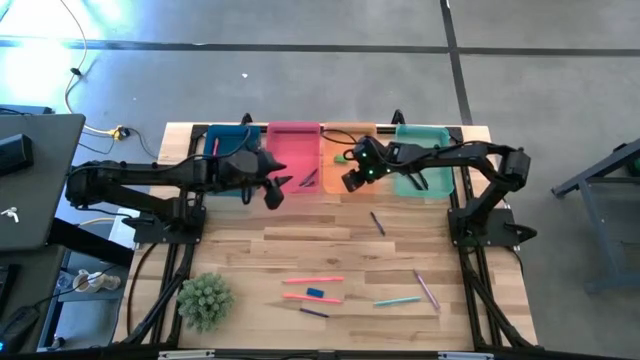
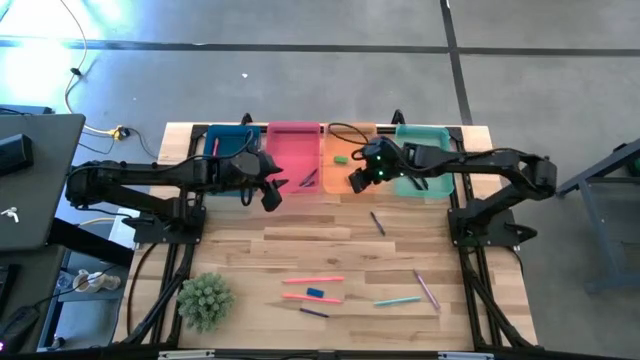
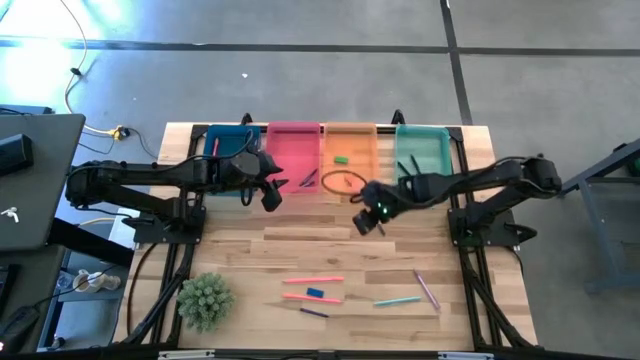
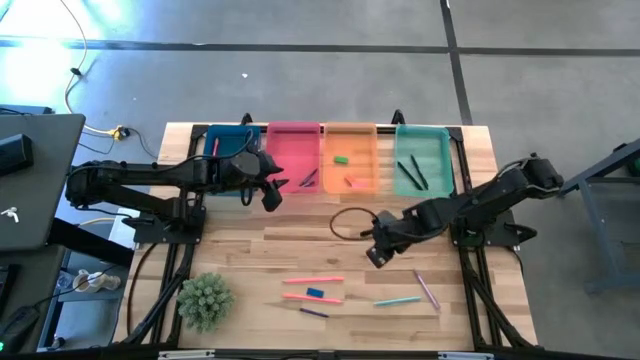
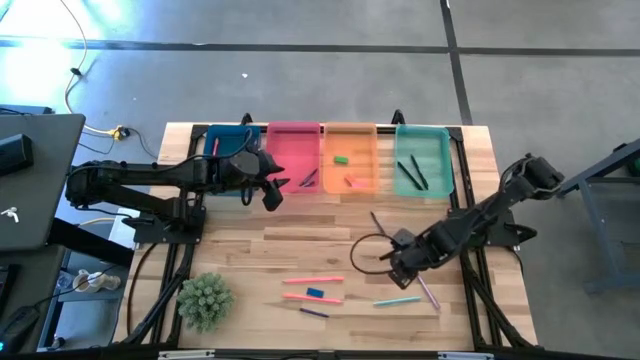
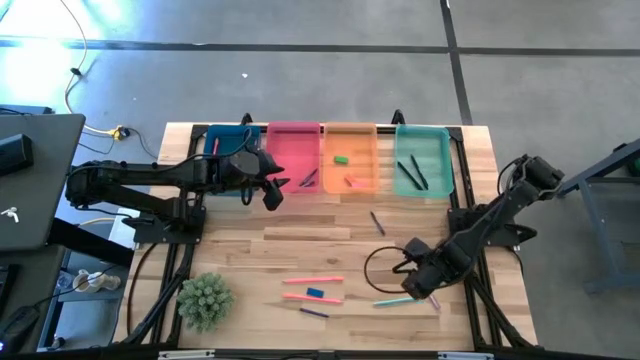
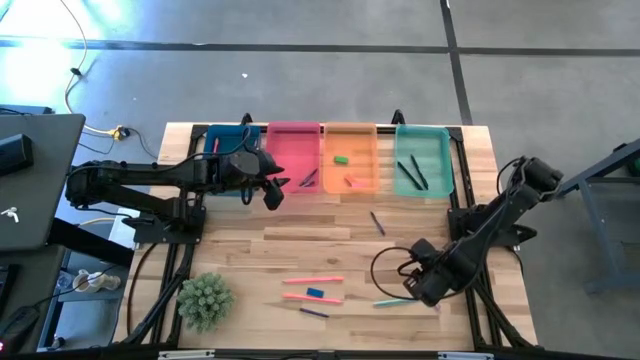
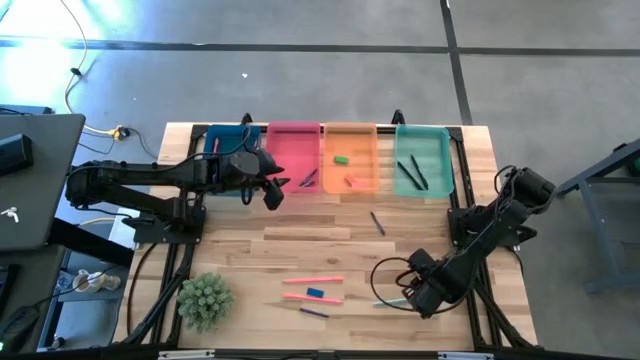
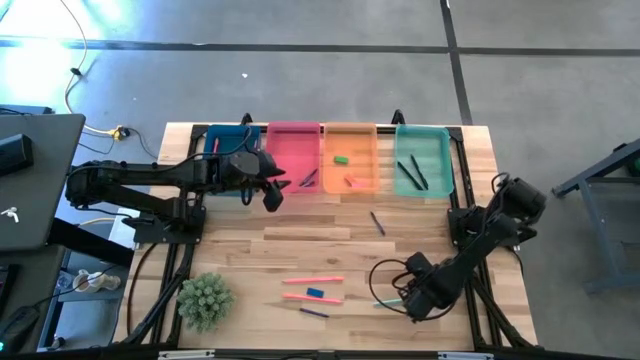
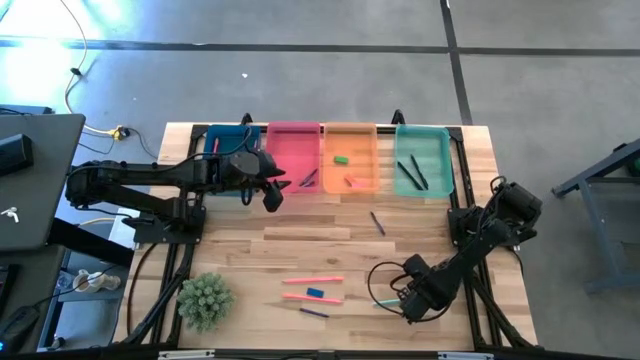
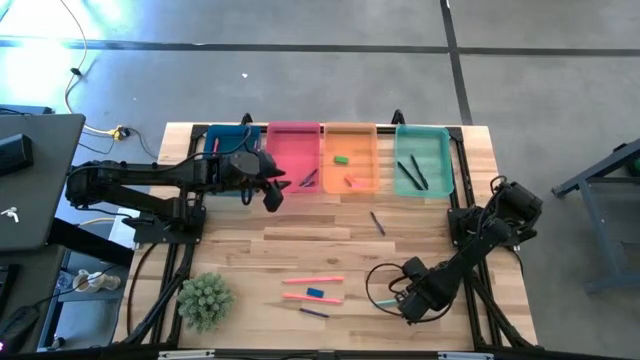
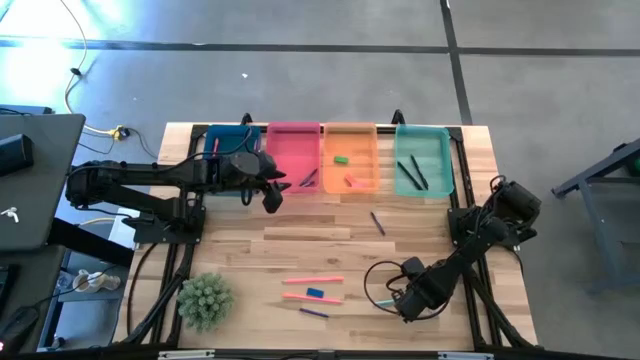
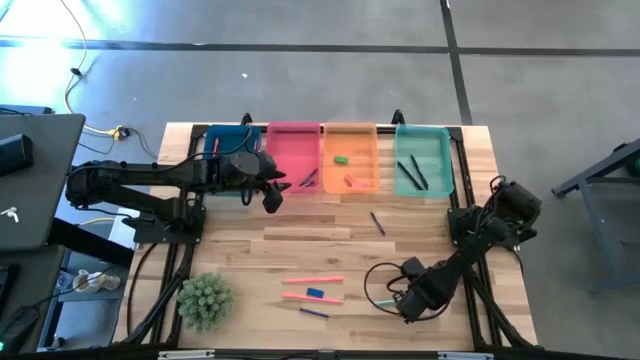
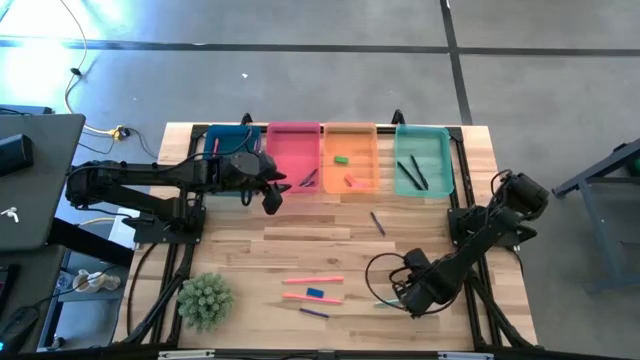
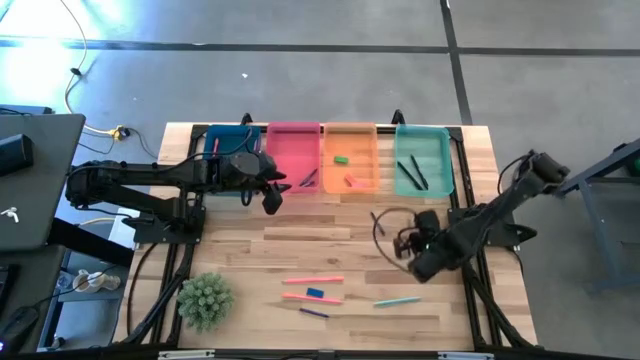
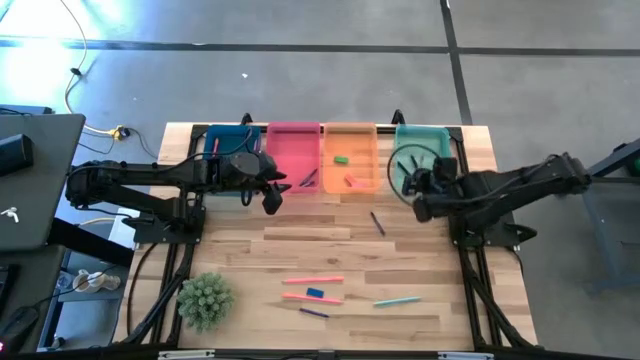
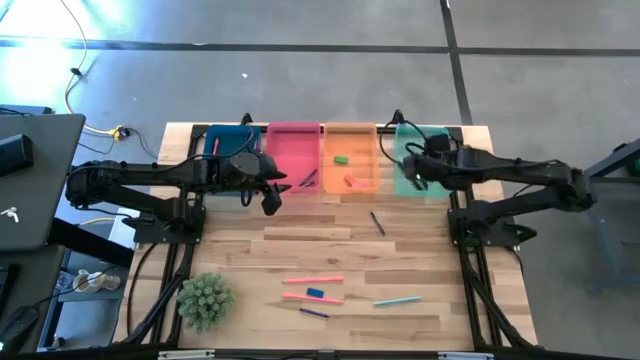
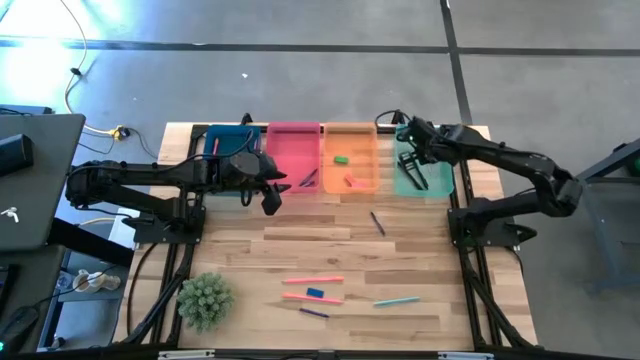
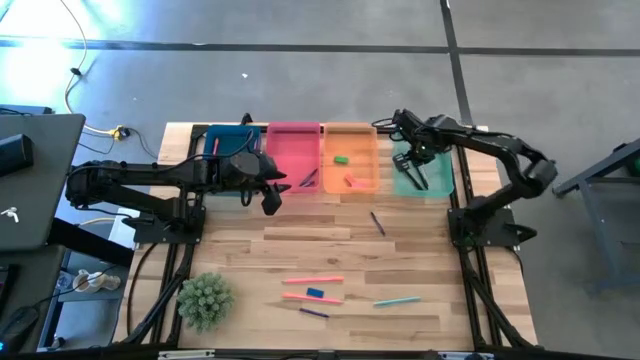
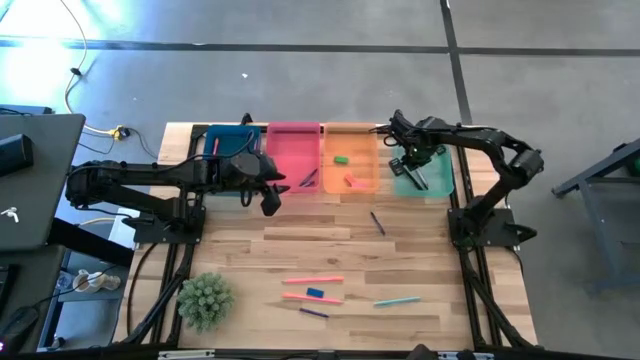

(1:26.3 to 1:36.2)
Task: Sort crayons/erasers/pens/pencils in bins
Put the purple pen into the green bin

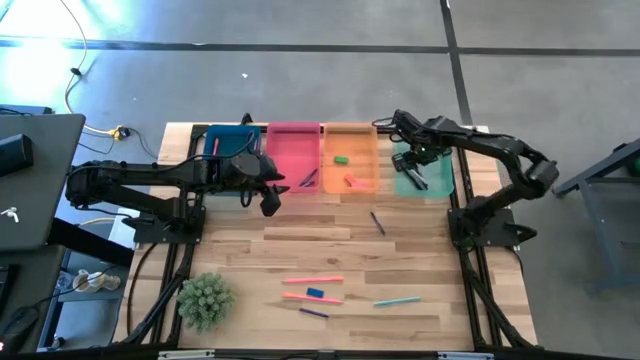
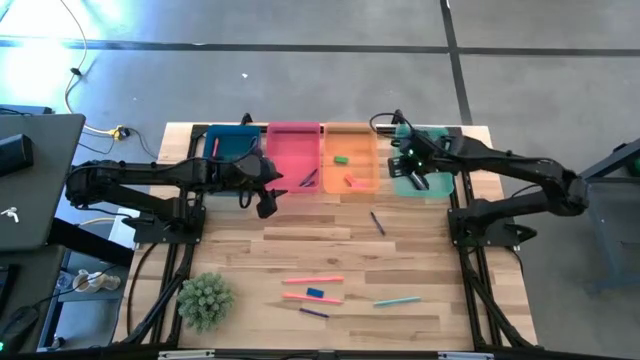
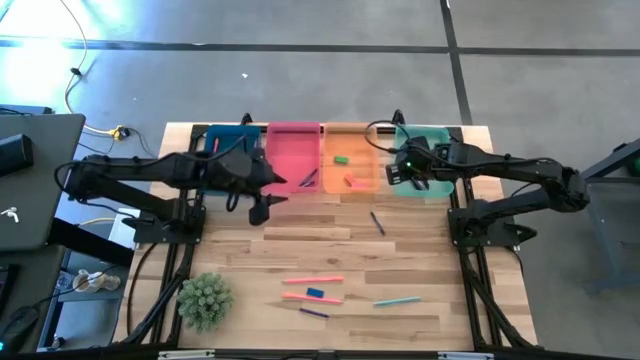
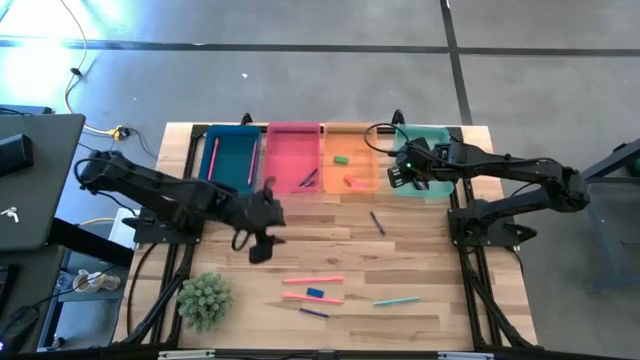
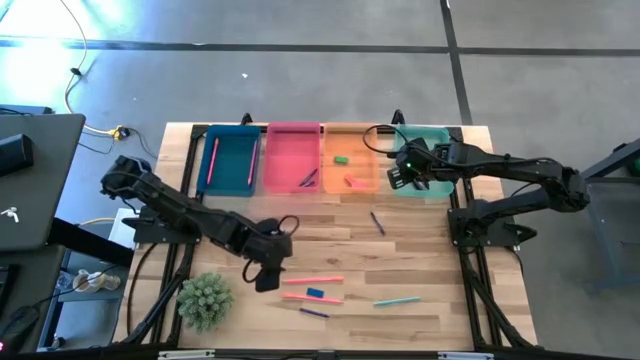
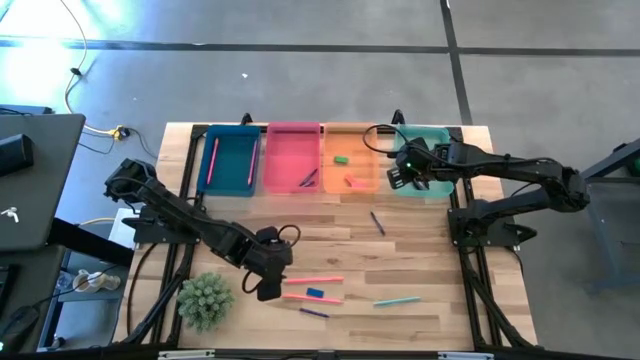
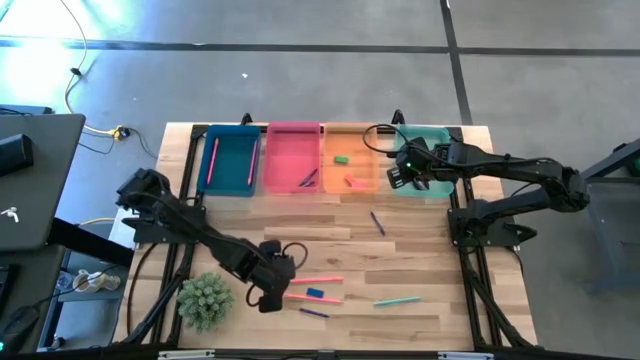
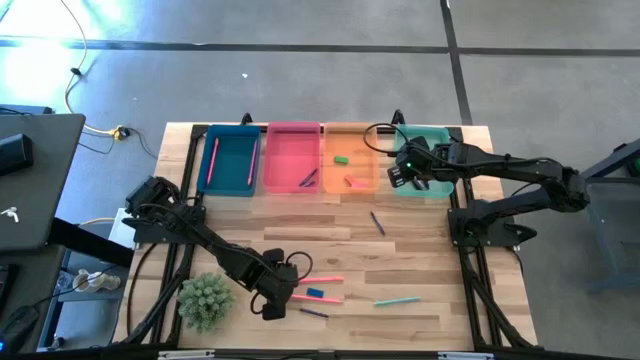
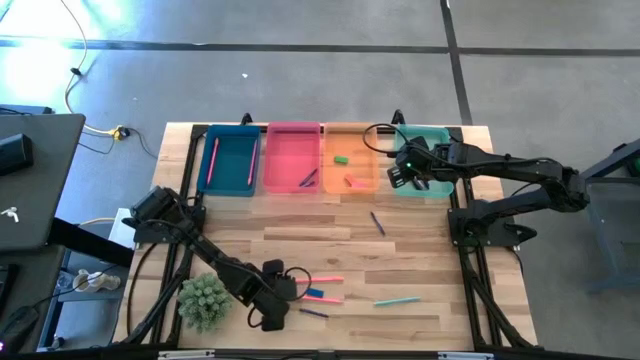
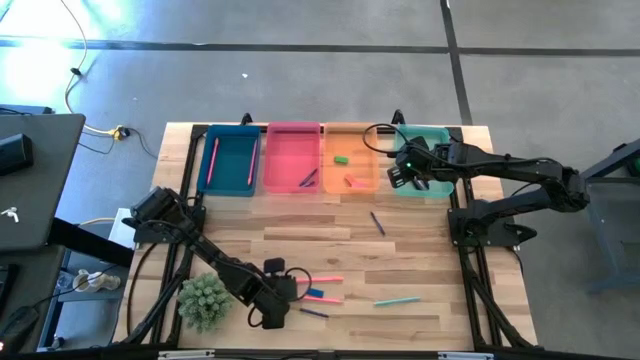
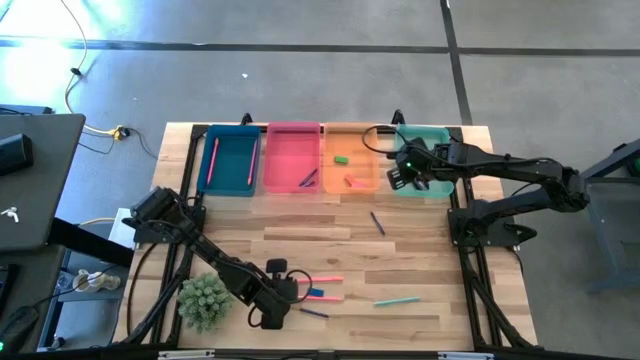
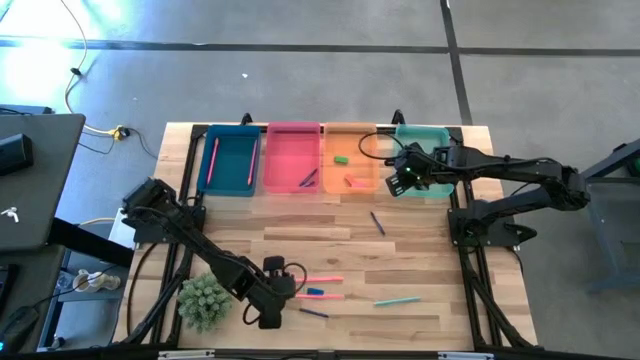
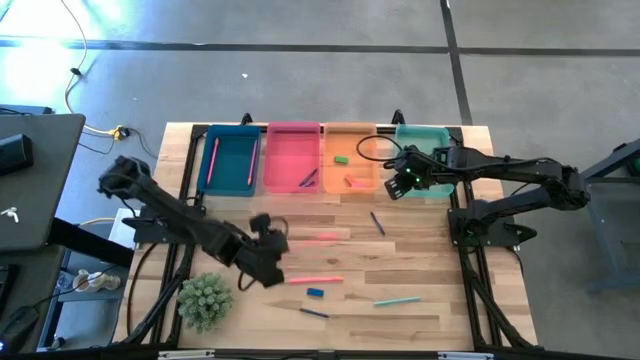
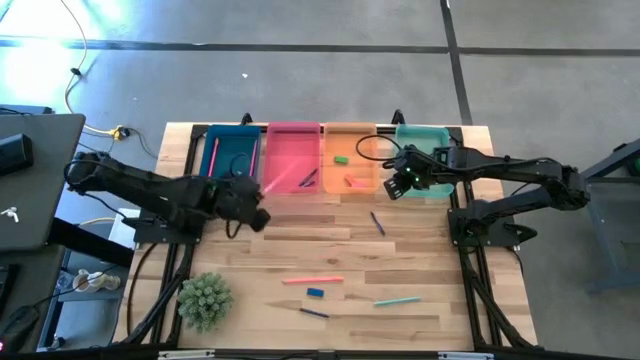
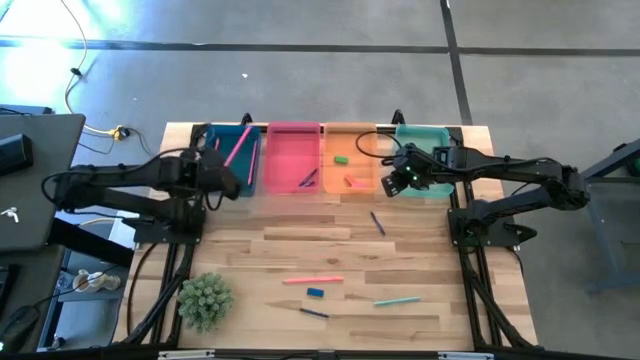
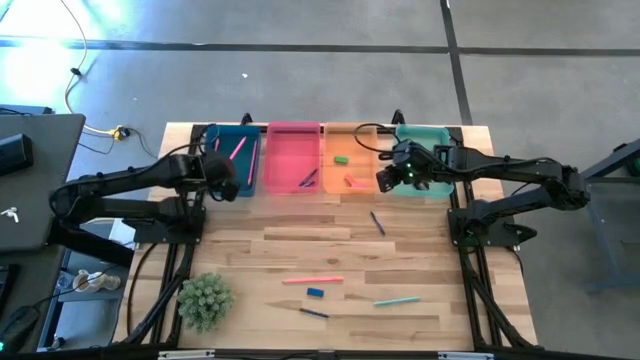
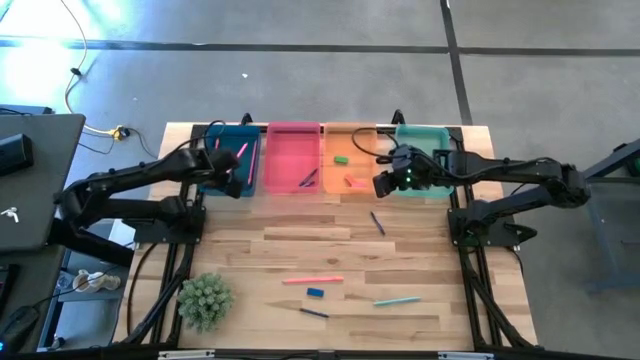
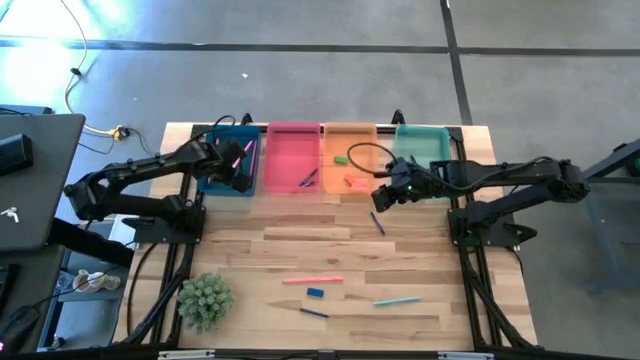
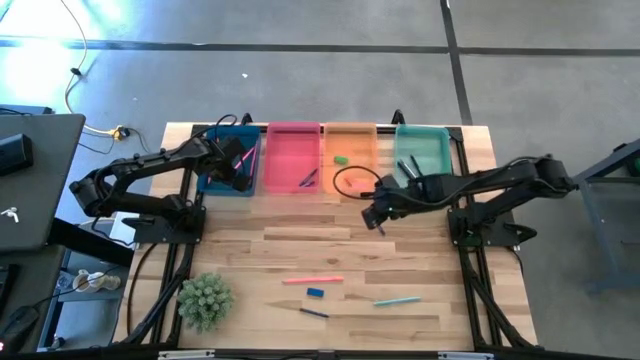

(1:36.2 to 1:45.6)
Put the bottom pink pencil into the blue bin

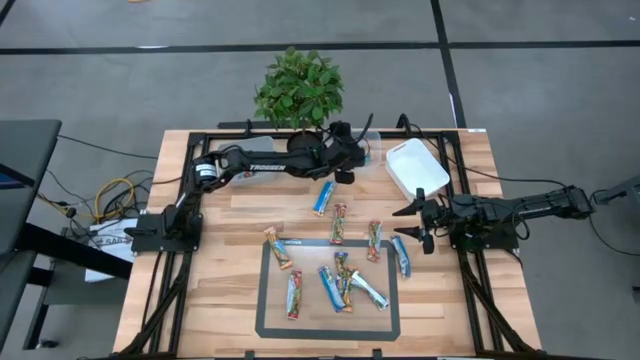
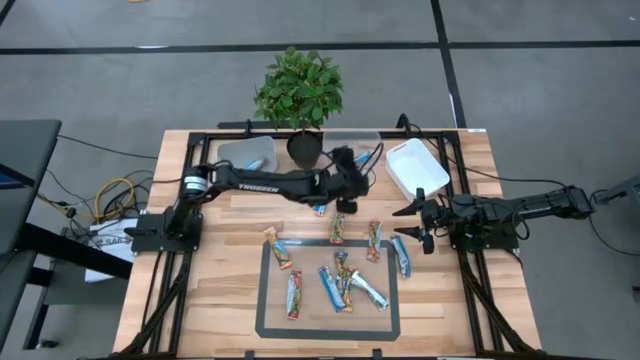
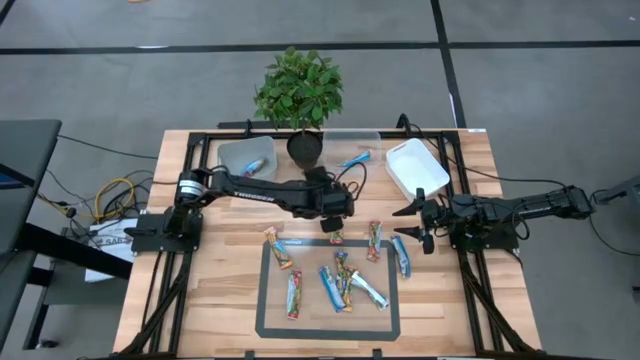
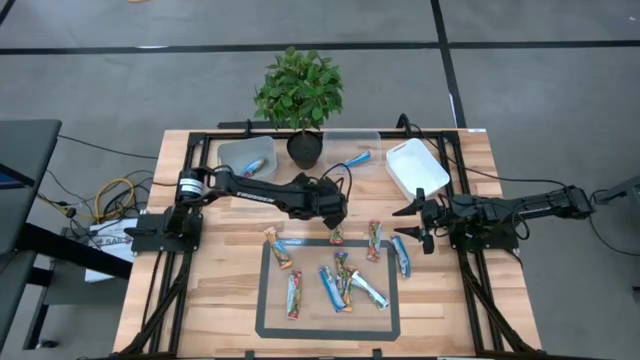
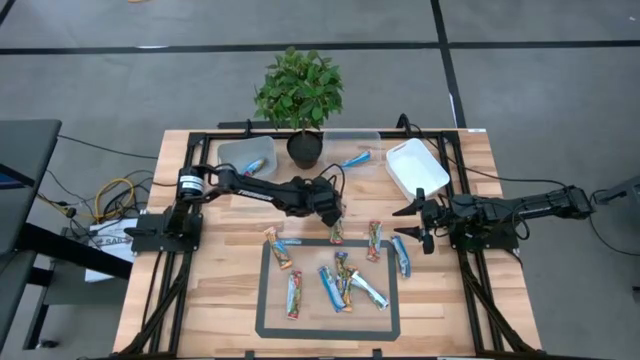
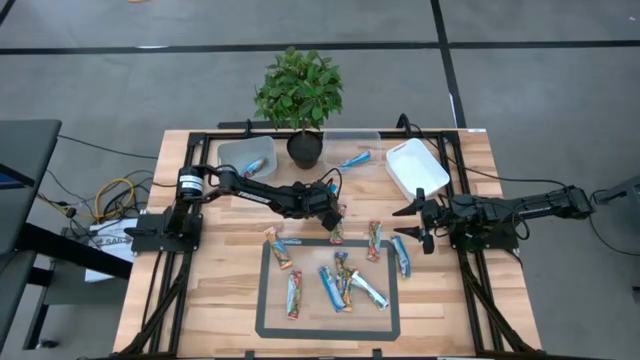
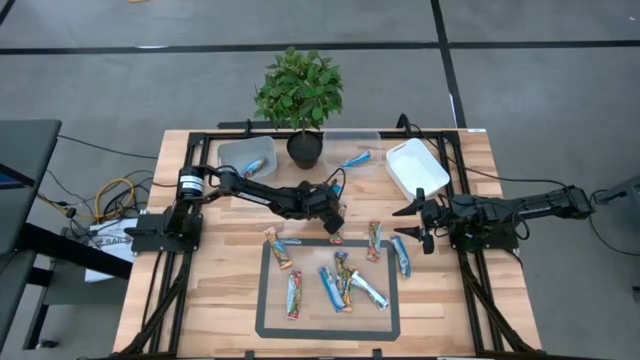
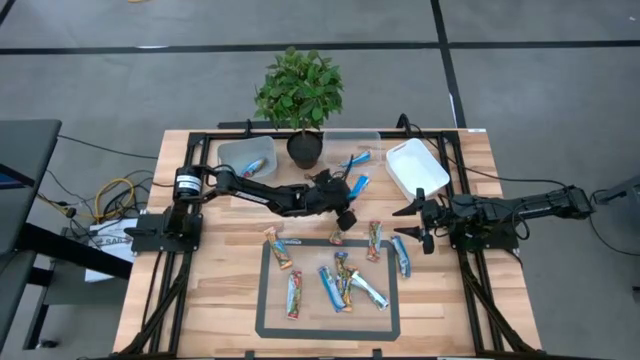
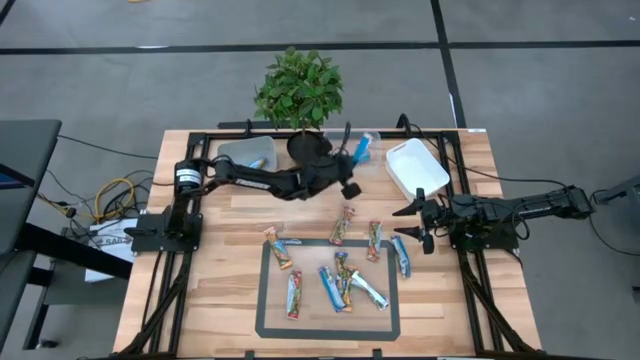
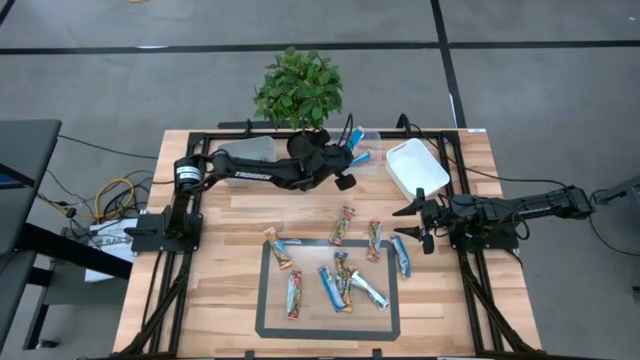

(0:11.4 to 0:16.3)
Task: Pick and place Granola Bars by type
Put the yellow granola bar into the transparent bin
